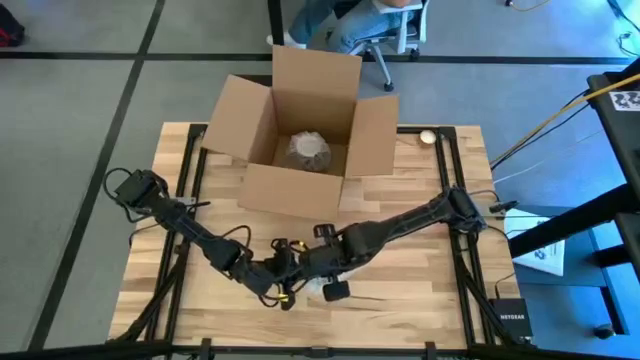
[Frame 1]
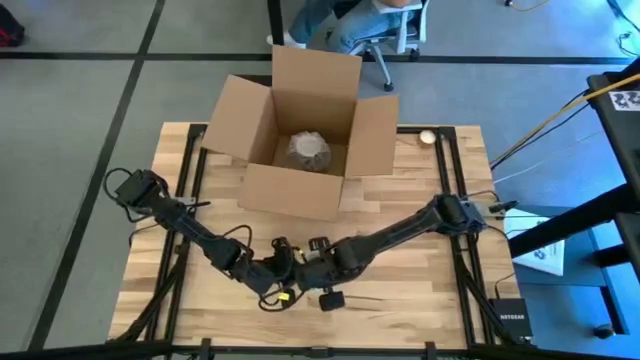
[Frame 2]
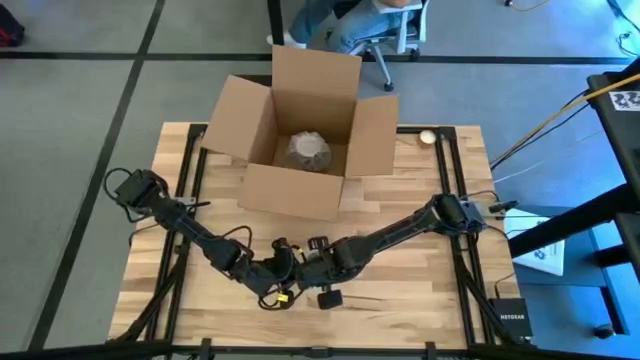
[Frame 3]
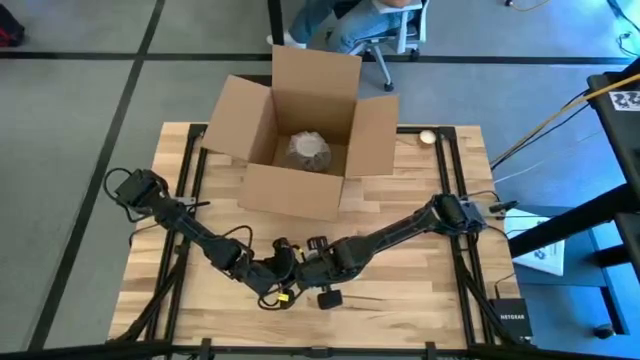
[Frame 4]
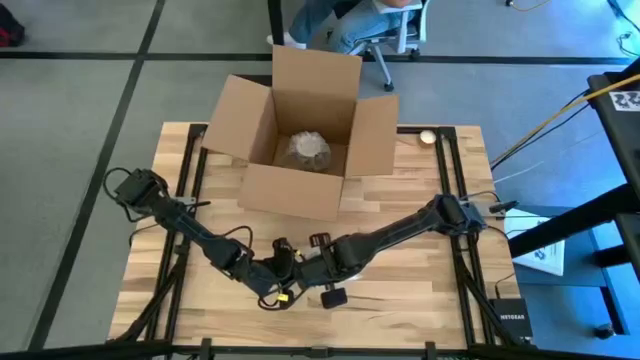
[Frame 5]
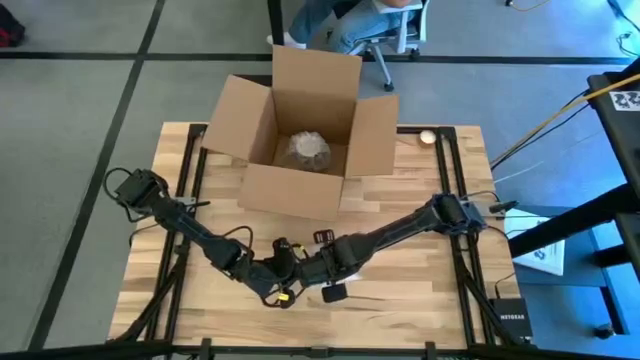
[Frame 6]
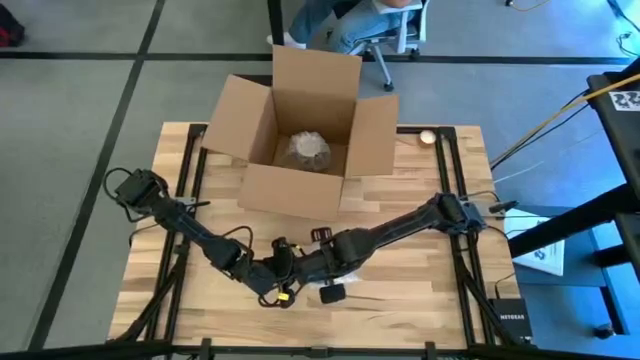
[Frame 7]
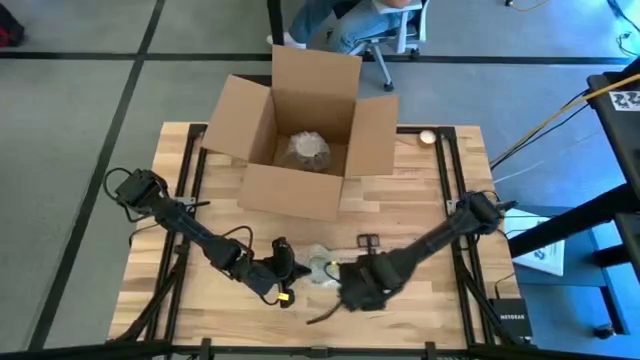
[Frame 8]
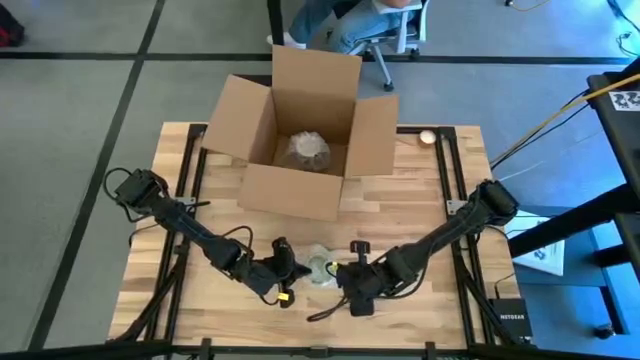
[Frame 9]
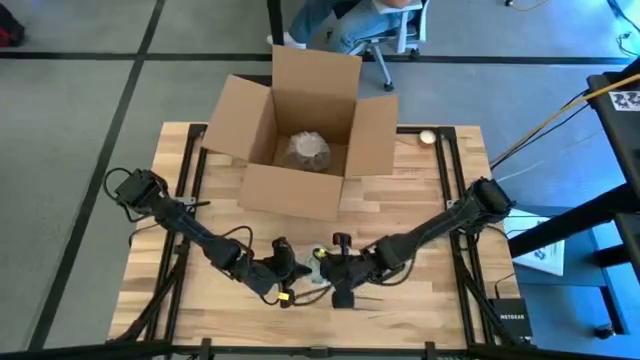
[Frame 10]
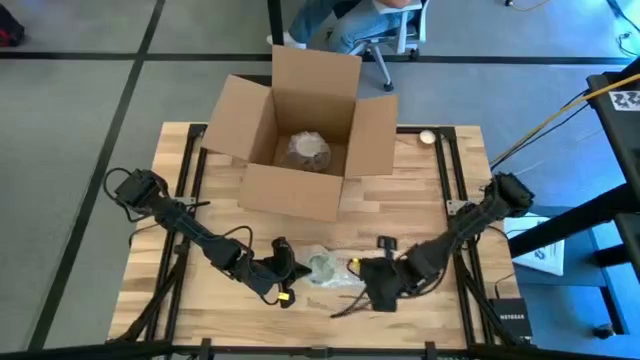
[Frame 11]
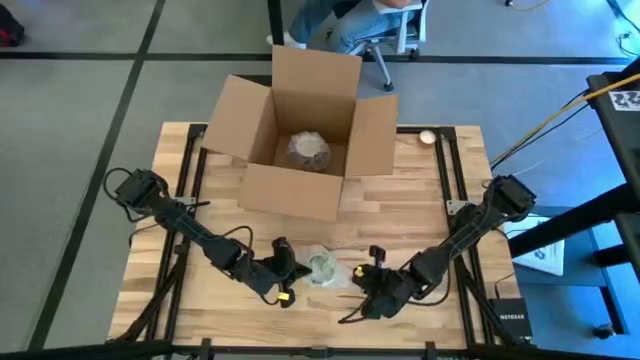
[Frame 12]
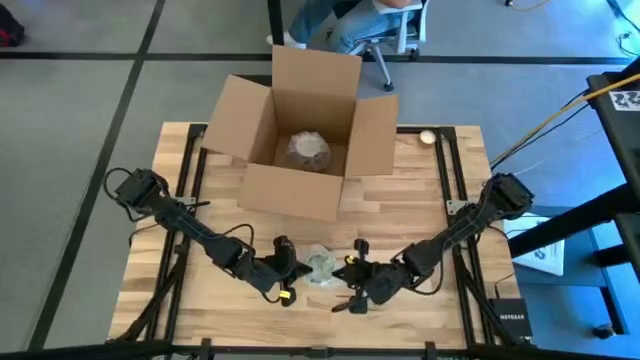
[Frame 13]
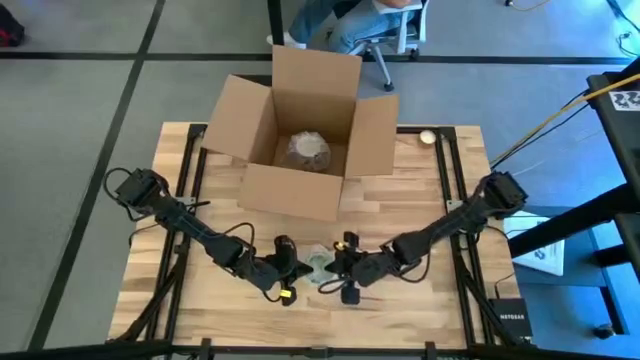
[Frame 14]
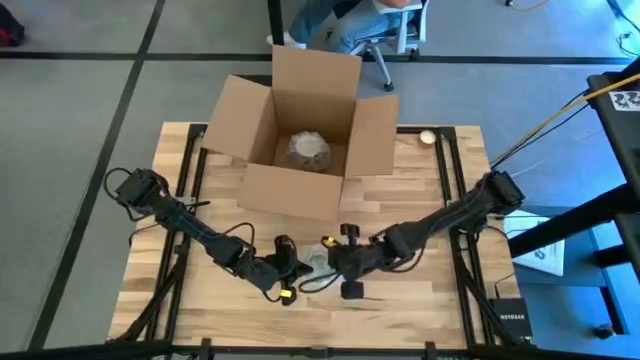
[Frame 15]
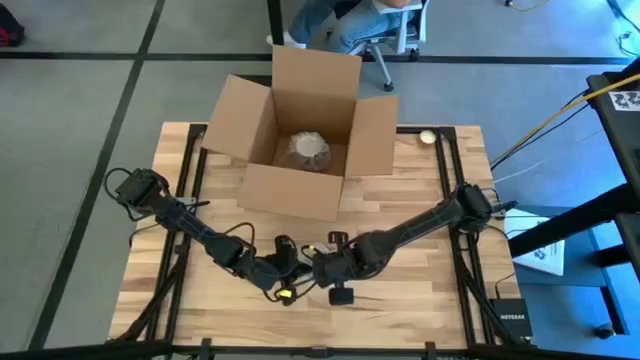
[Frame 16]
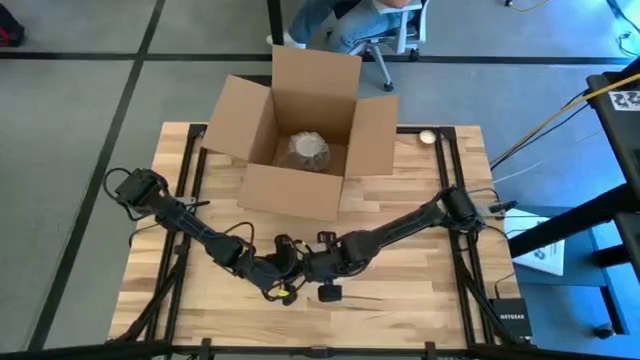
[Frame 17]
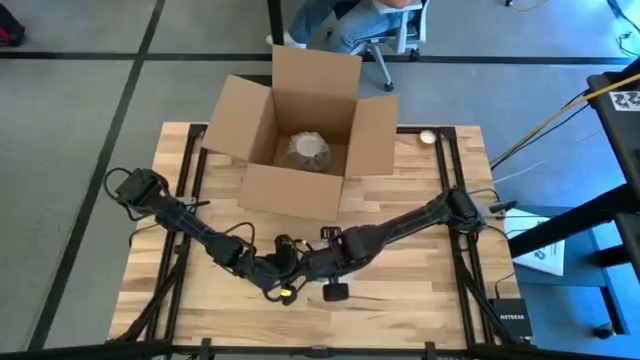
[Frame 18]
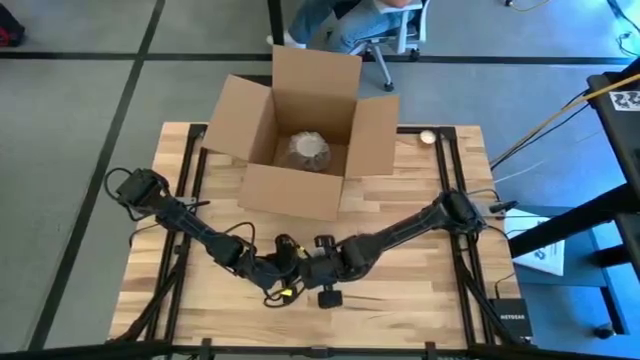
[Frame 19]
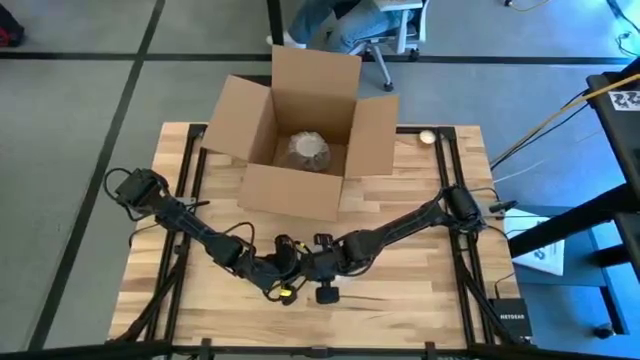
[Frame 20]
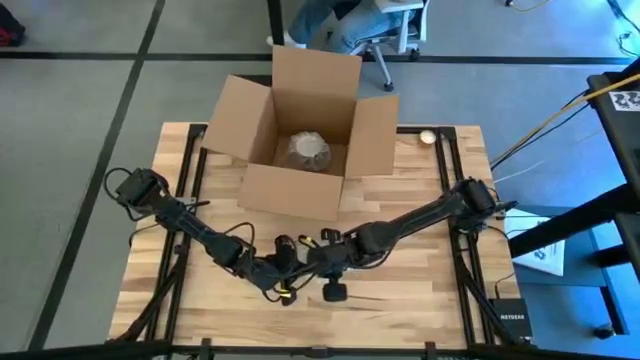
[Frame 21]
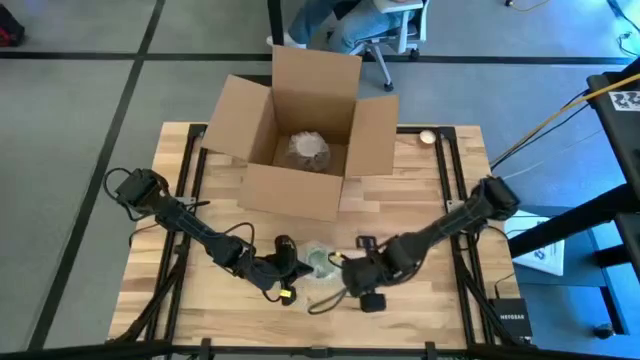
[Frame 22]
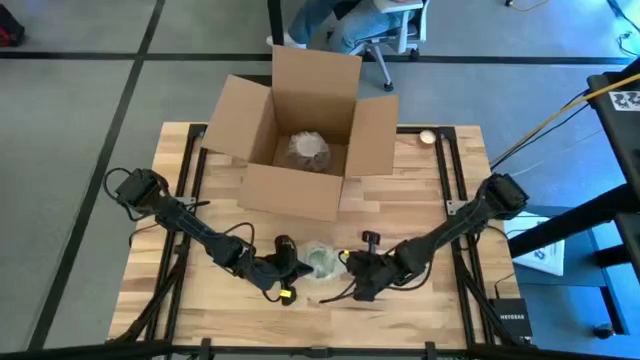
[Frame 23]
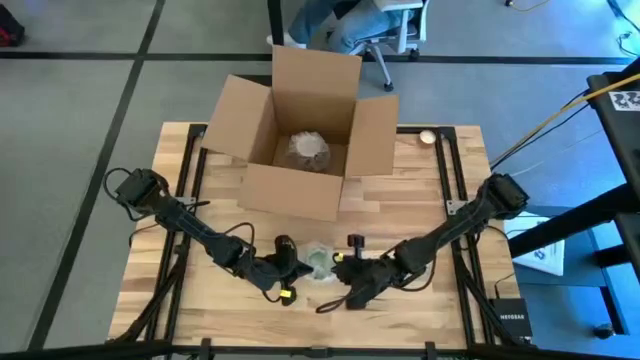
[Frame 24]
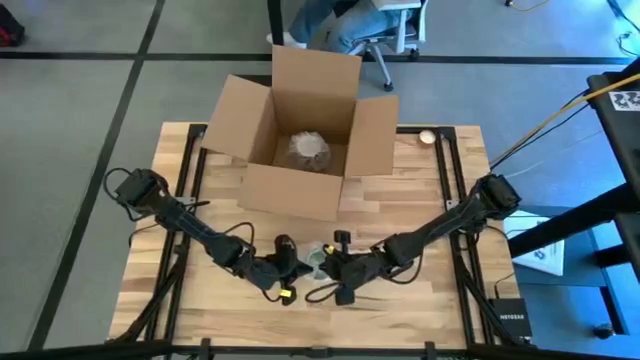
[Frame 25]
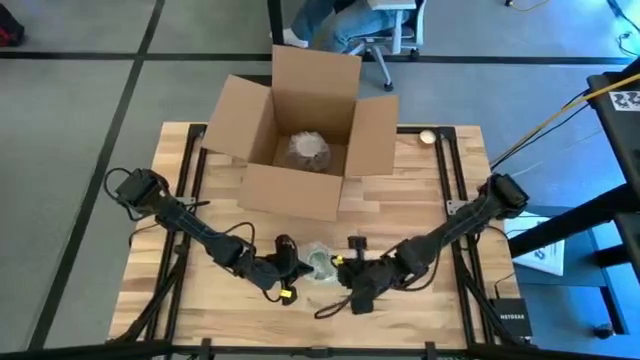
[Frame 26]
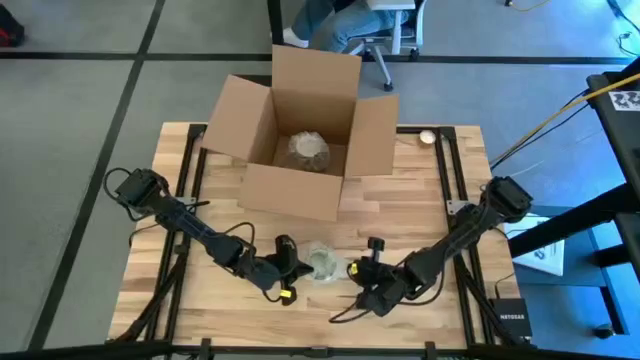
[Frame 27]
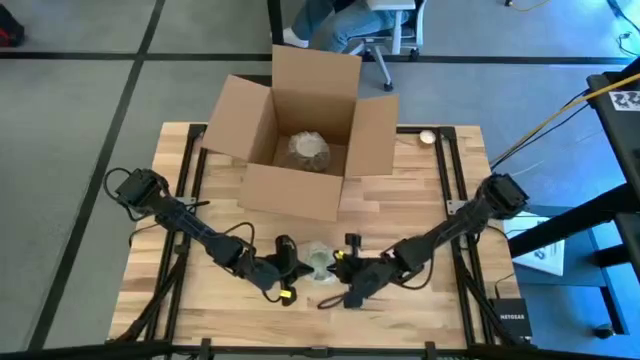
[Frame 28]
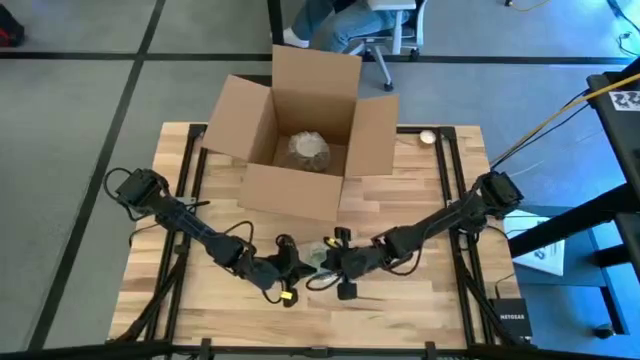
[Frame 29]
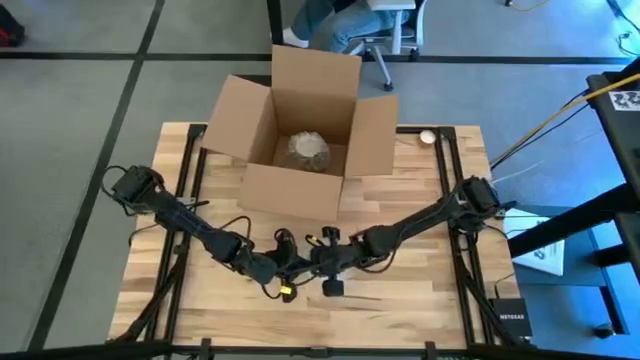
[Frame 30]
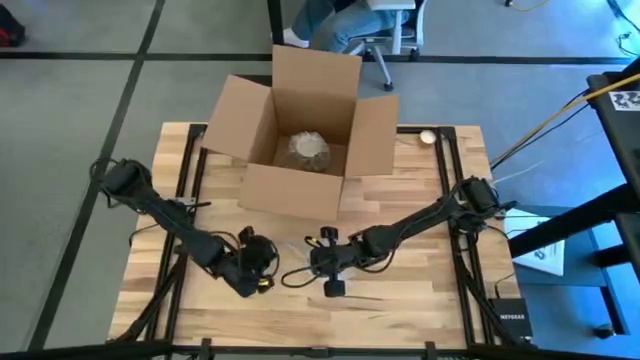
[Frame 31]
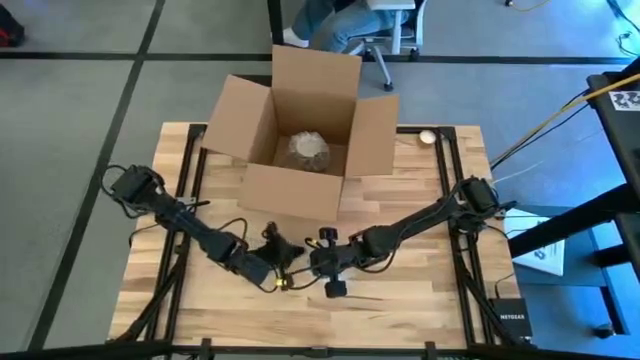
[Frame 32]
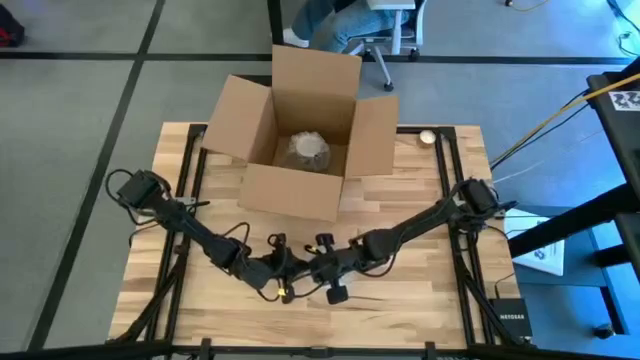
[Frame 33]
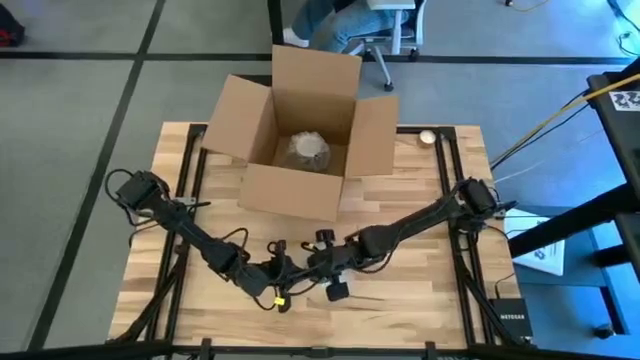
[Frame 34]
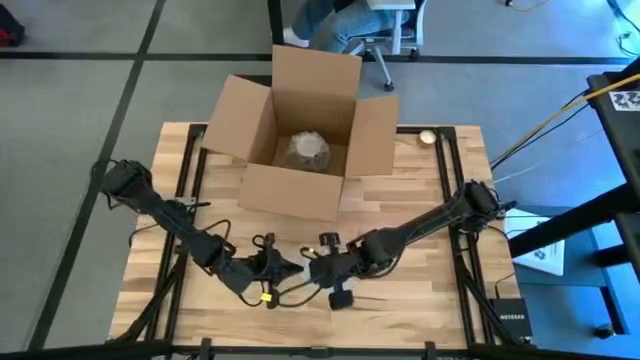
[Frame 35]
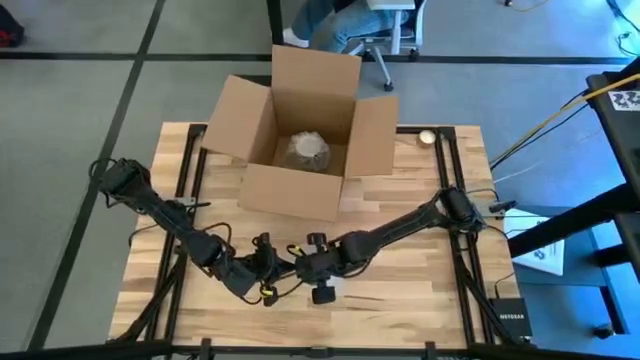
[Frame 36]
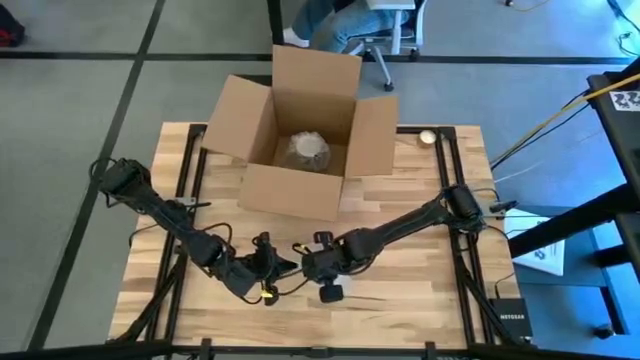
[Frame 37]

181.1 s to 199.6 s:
Task: wrap mug
Wrap the green mug with the transparent bubble wrap

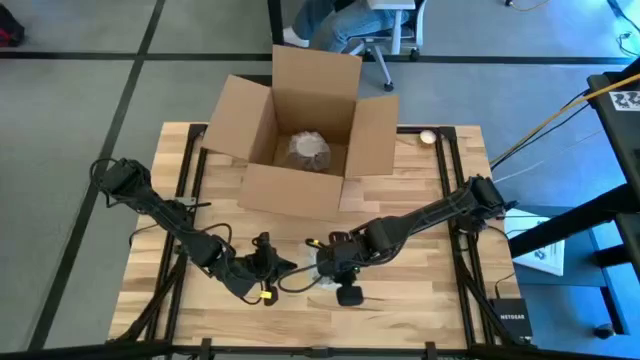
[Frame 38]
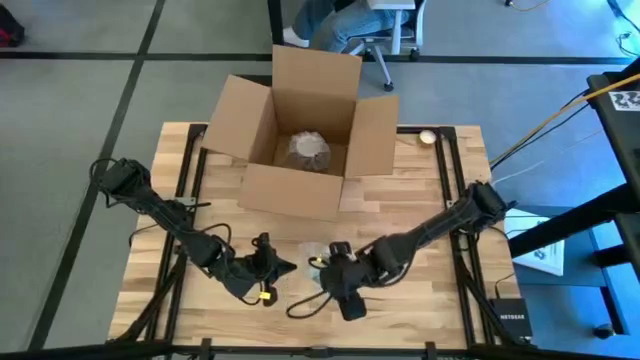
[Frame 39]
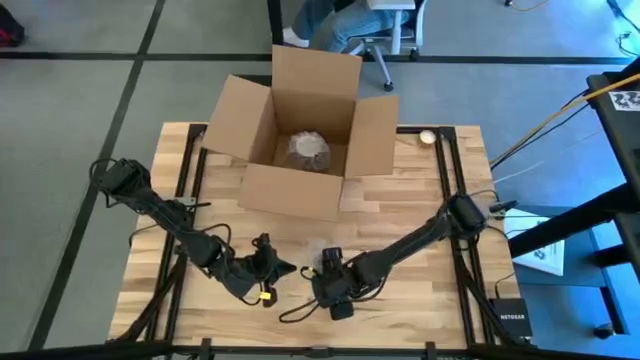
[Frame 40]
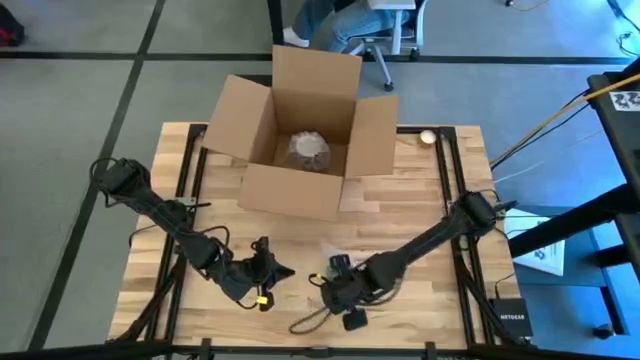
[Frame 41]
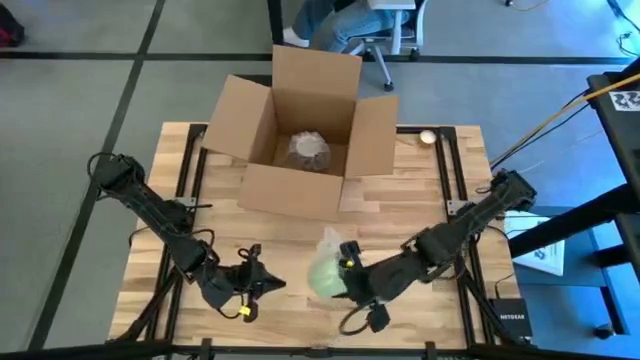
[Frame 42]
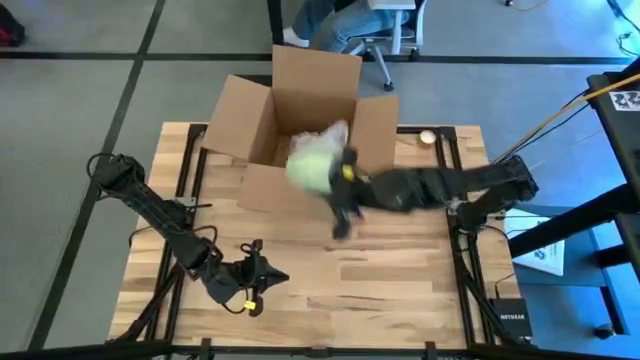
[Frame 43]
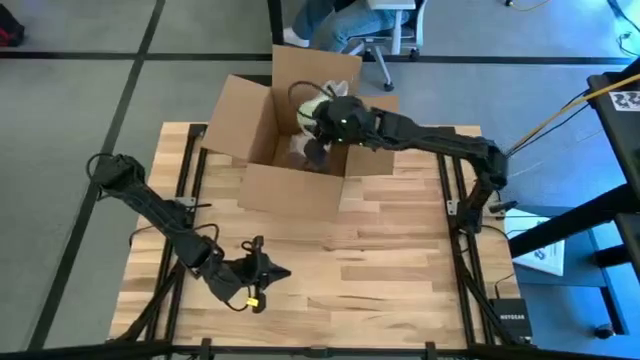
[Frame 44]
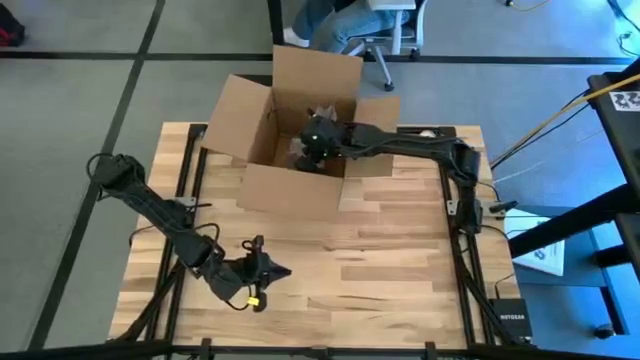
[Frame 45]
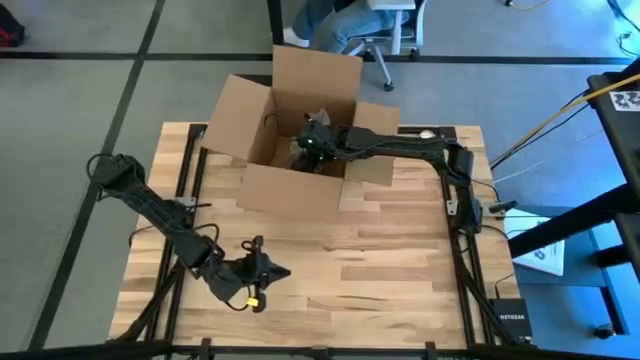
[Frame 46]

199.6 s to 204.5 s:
Put the wrapped green mug into the brown cardboard box
